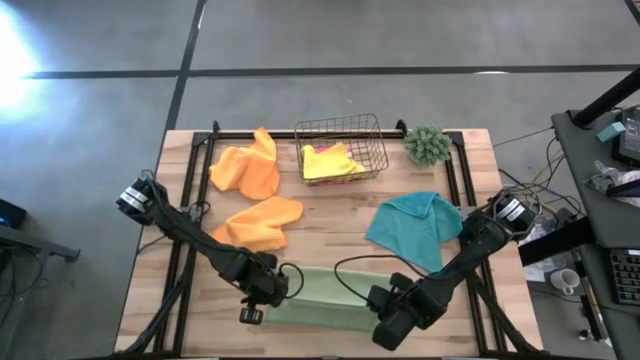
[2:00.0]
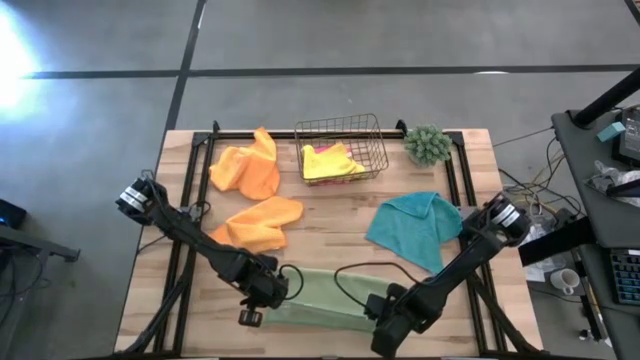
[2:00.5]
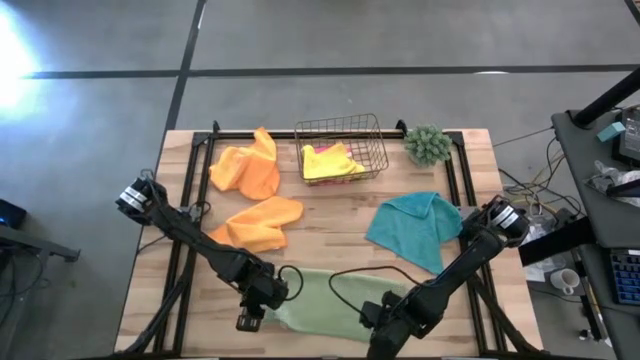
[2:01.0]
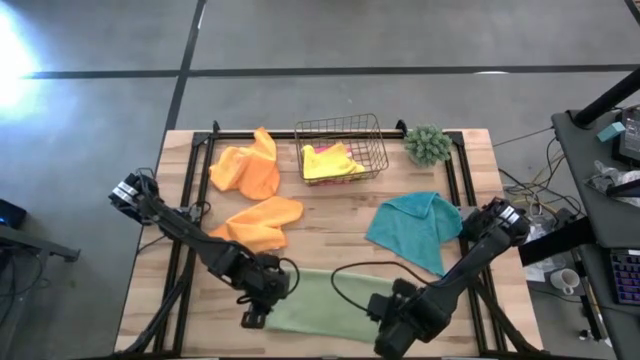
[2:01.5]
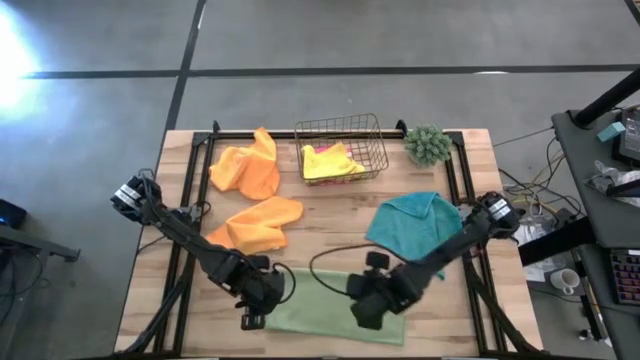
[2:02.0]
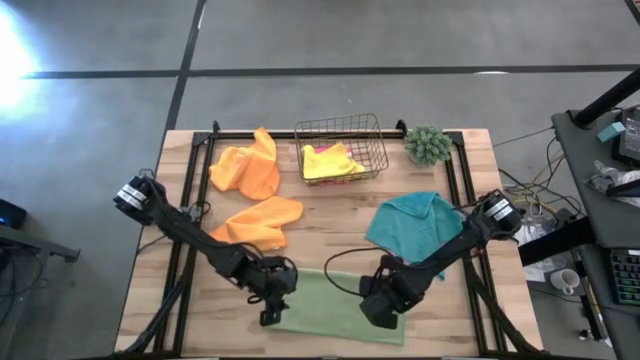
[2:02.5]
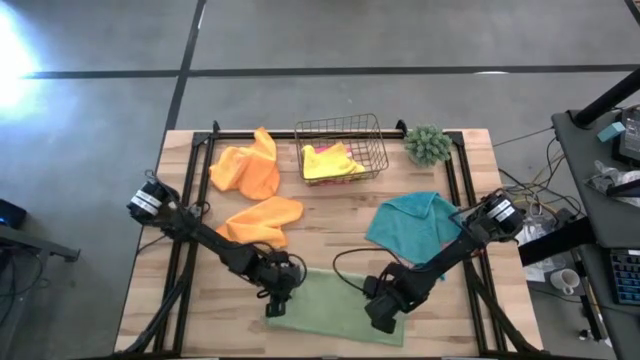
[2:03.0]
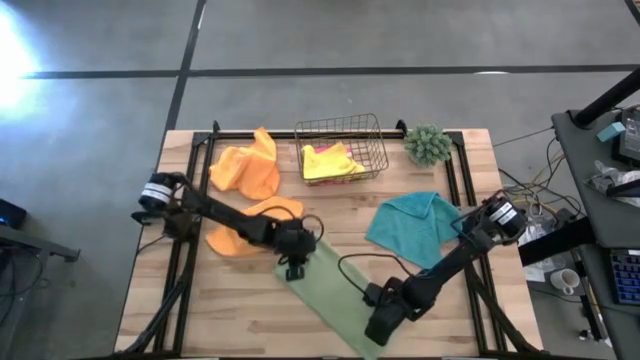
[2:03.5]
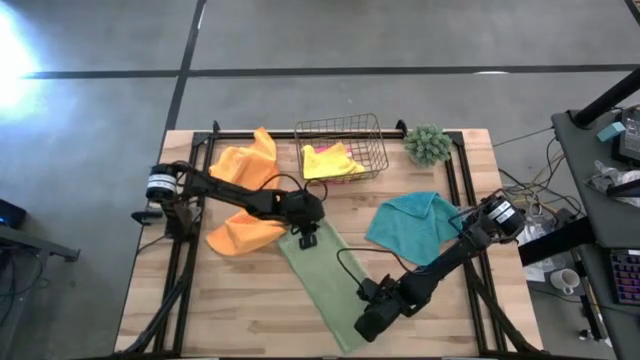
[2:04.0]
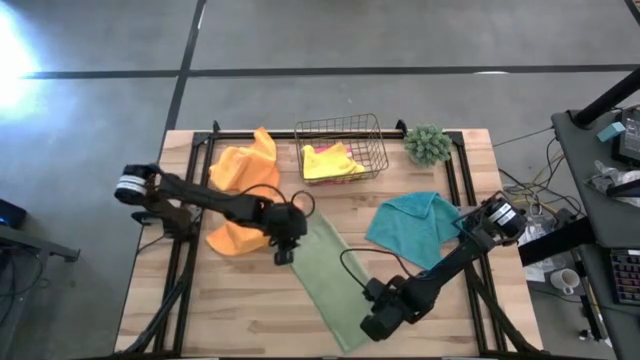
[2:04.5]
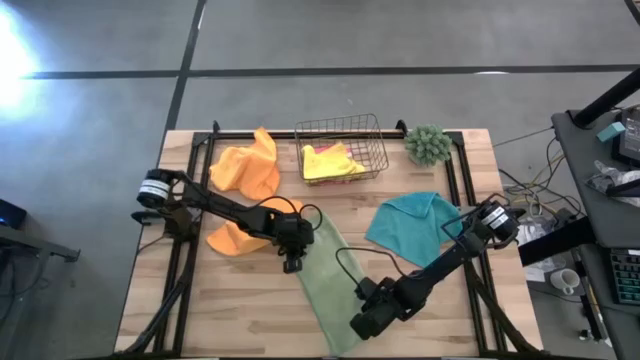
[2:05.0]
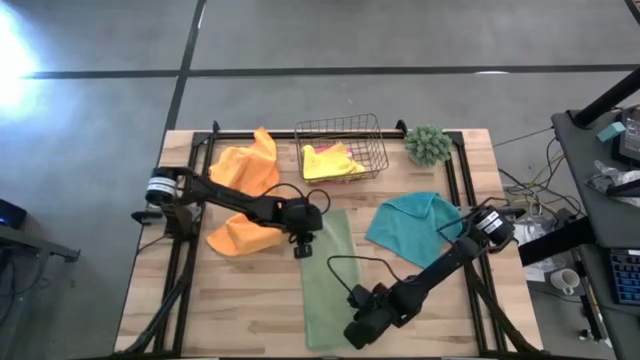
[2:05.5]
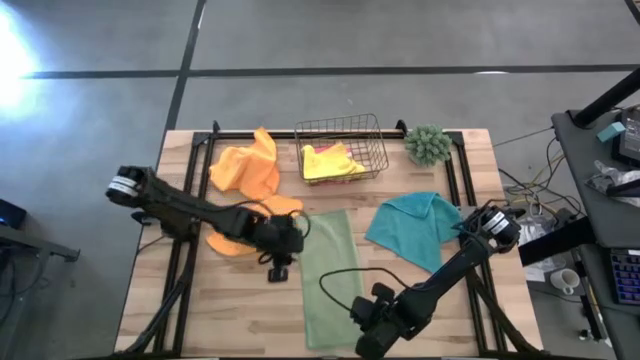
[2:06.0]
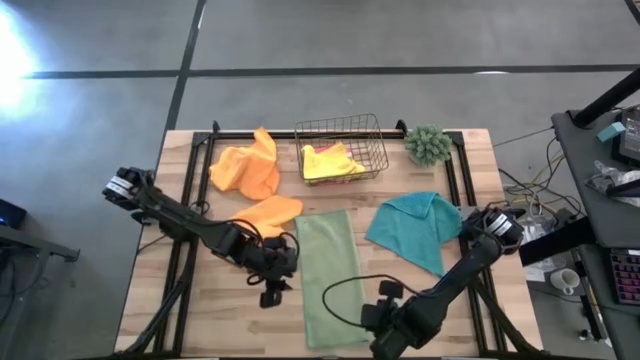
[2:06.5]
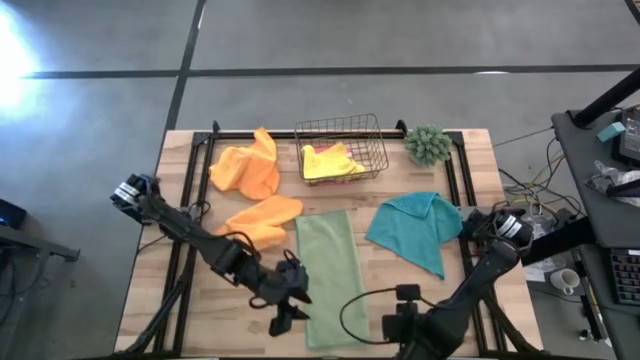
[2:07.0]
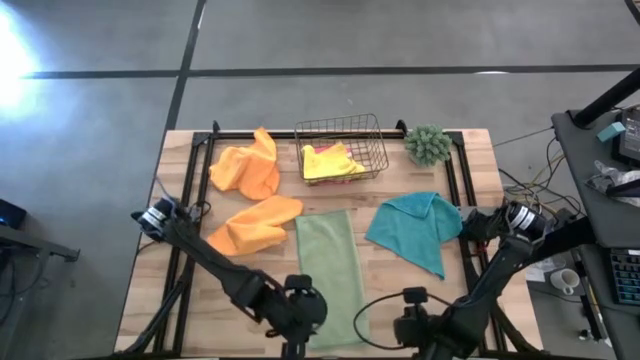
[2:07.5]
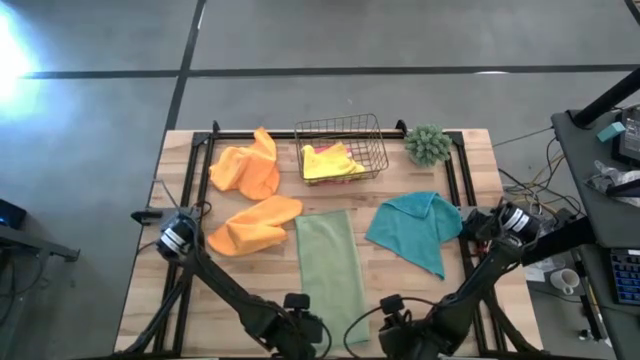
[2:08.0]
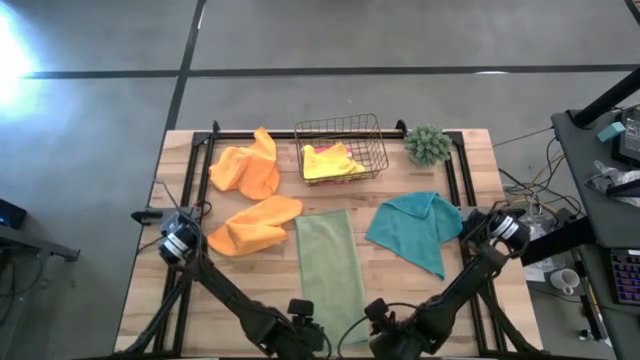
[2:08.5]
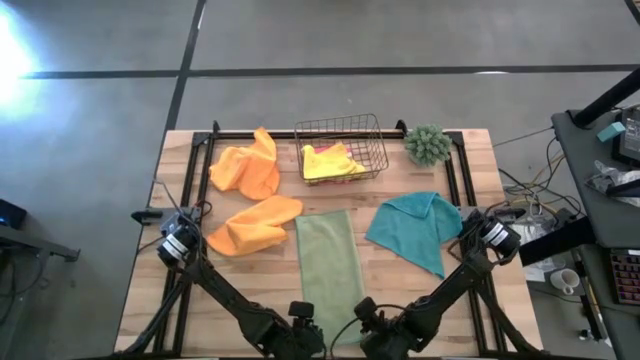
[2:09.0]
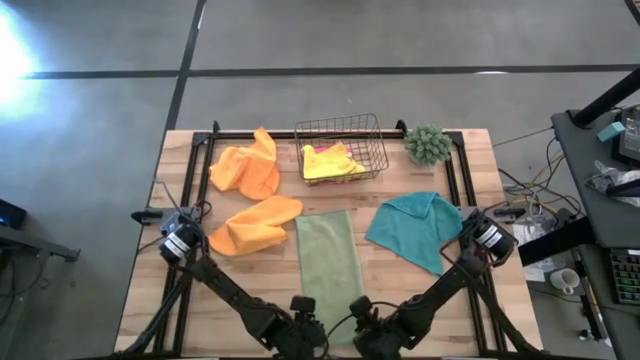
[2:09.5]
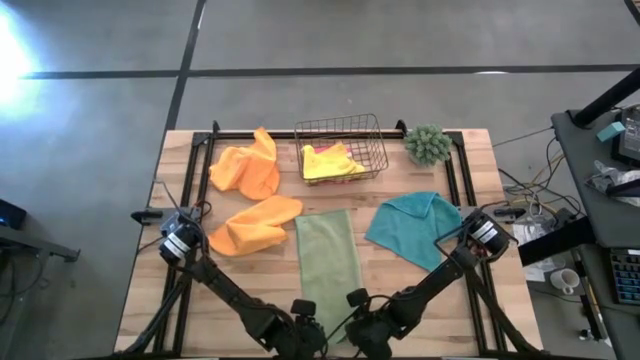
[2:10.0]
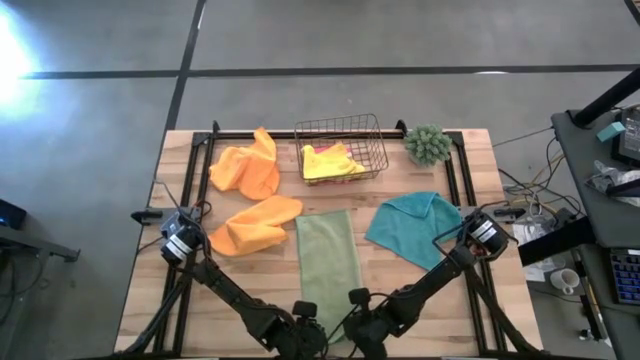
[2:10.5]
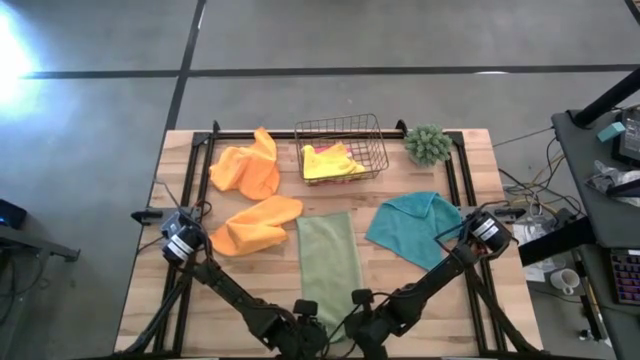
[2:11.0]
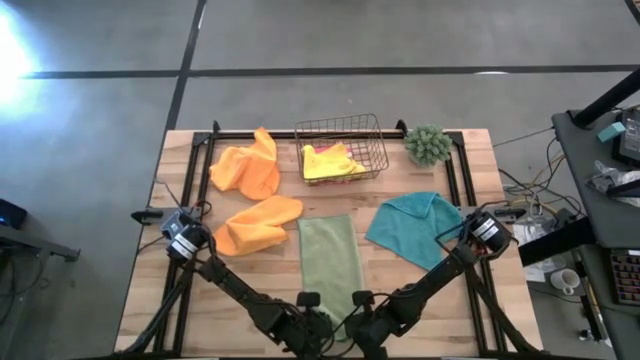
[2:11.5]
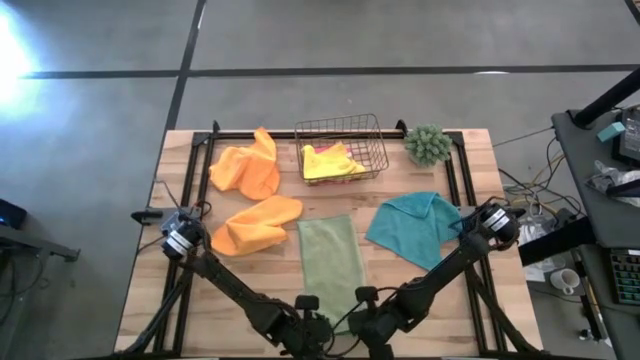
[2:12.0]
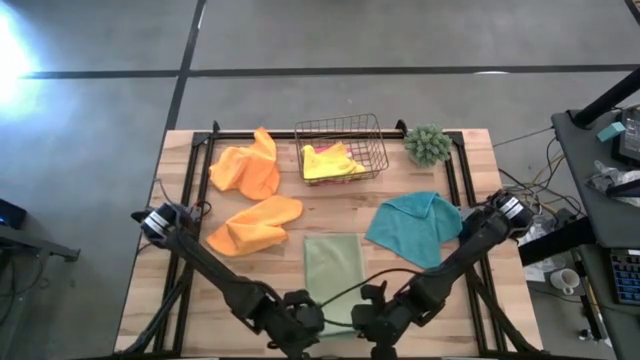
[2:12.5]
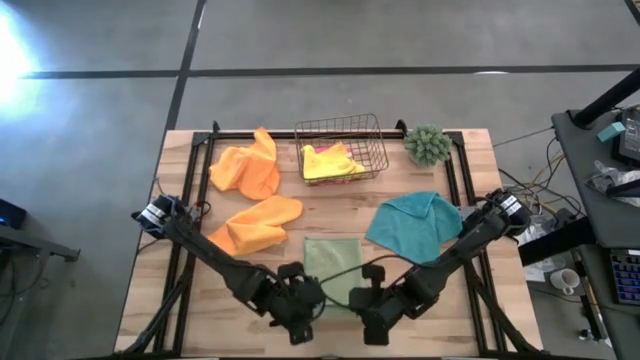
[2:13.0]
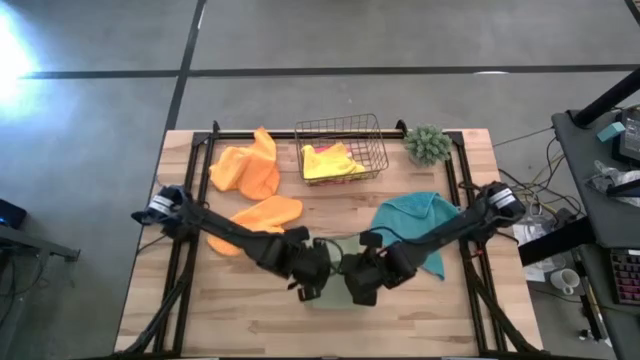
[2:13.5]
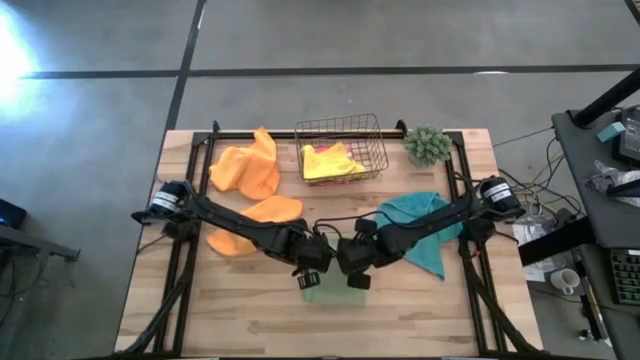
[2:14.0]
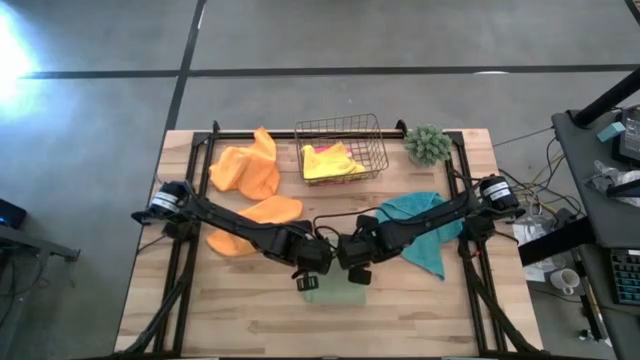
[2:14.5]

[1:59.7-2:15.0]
Task: Fold microfiber towels
Fold the green microfiber cloth

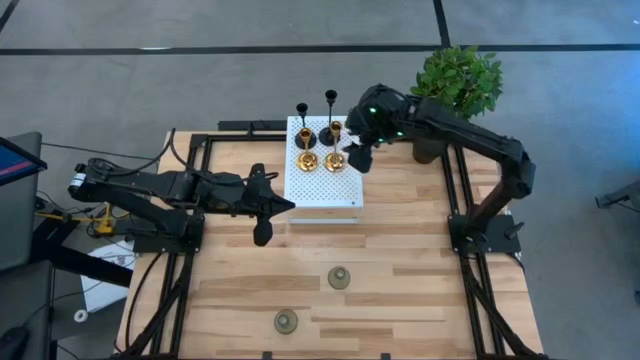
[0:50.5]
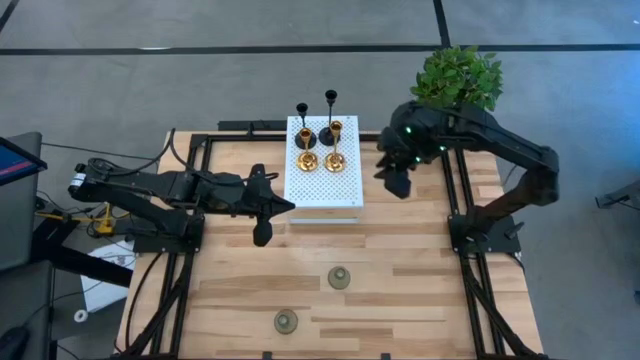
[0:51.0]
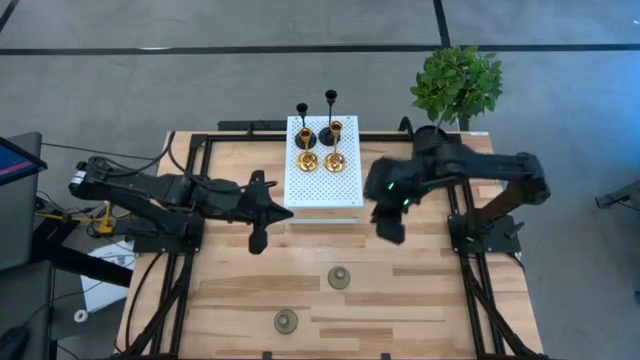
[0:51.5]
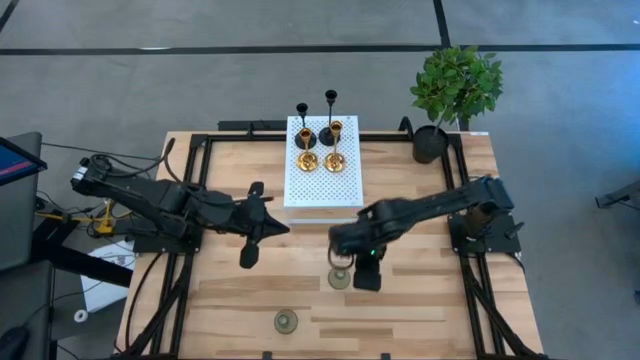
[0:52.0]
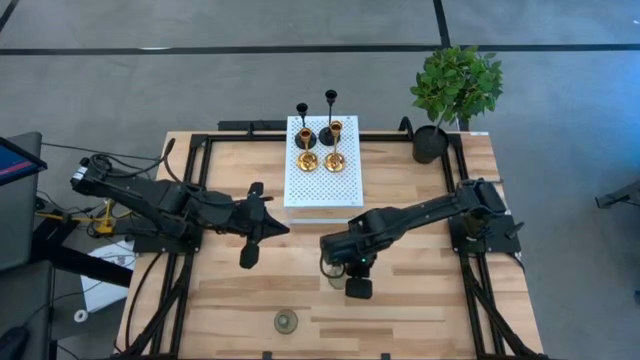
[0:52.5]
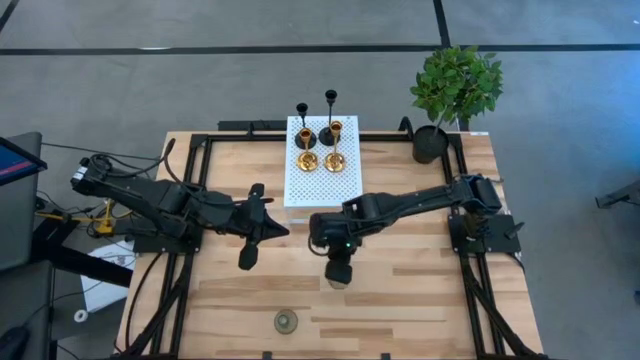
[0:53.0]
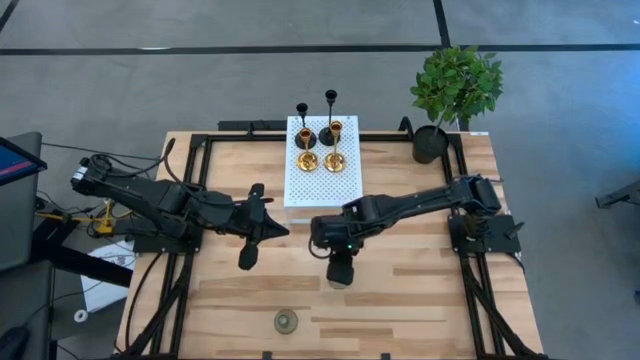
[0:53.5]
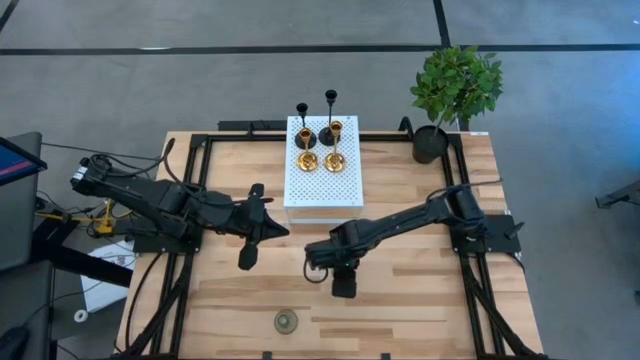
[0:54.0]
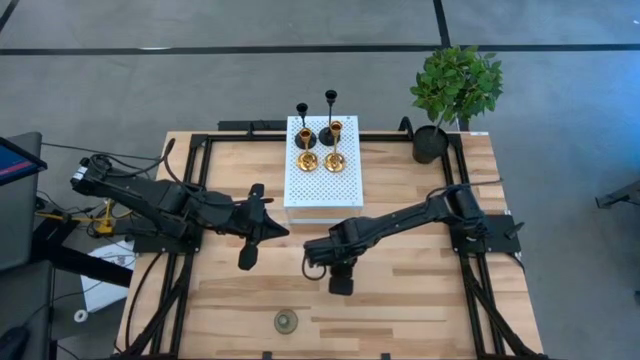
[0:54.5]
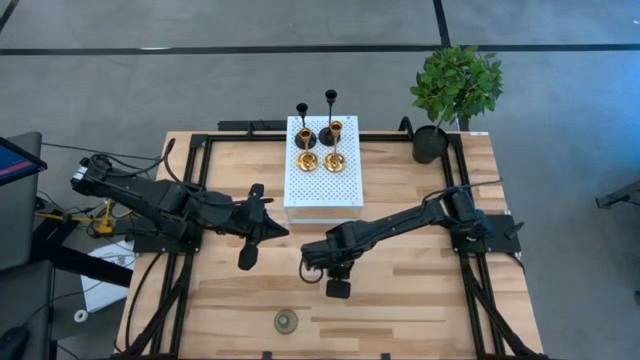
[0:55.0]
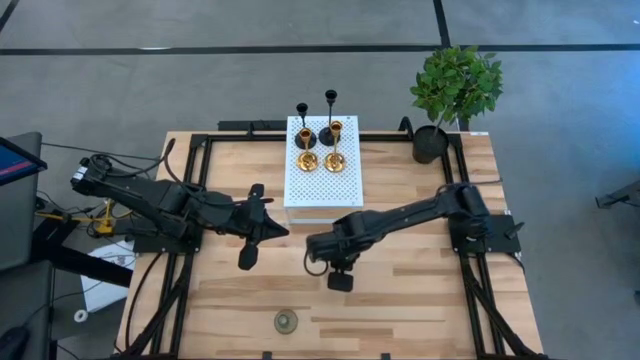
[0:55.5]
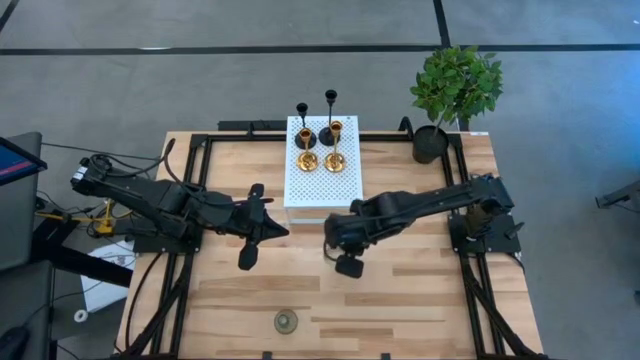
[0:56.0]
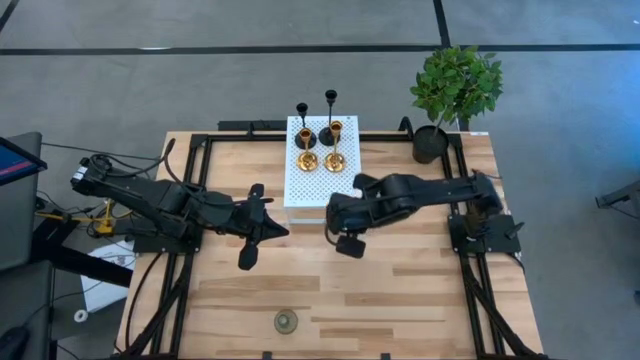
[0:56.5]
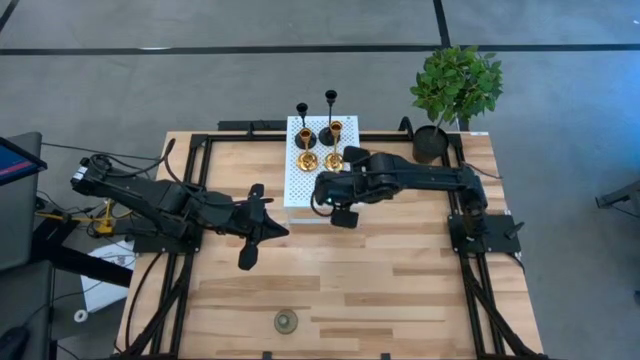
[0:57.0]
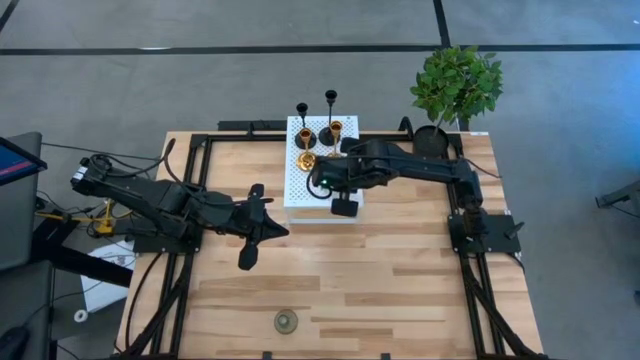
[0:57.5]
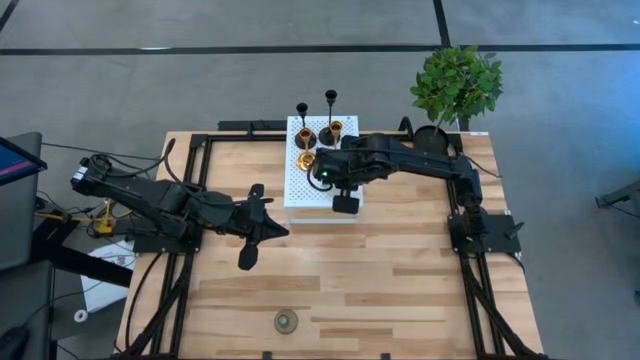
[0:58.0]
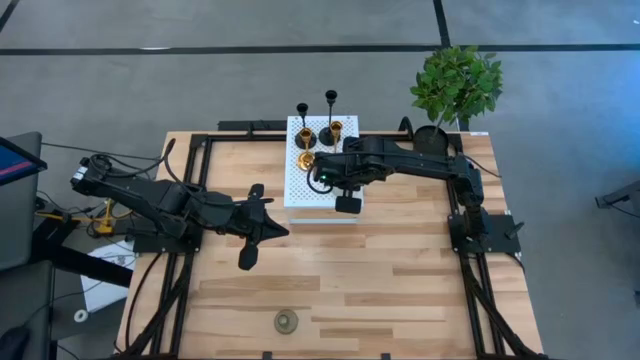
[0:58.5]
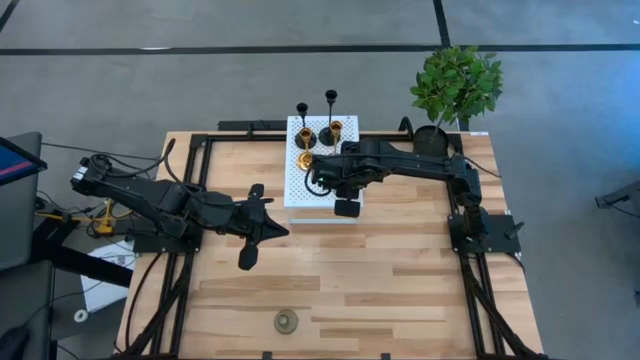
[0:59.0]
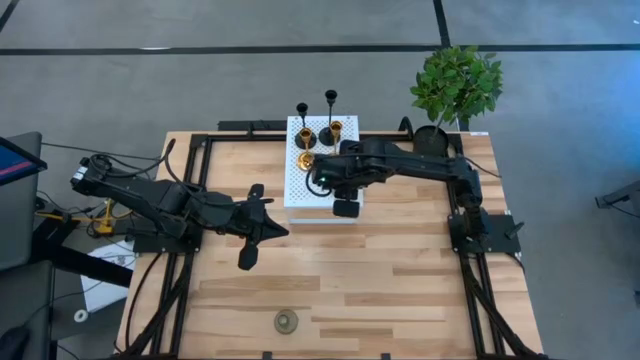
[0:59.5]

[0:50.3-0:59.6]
Task: Pick & Place candle stick holders
Put the top green glass candle holder on the shelf
